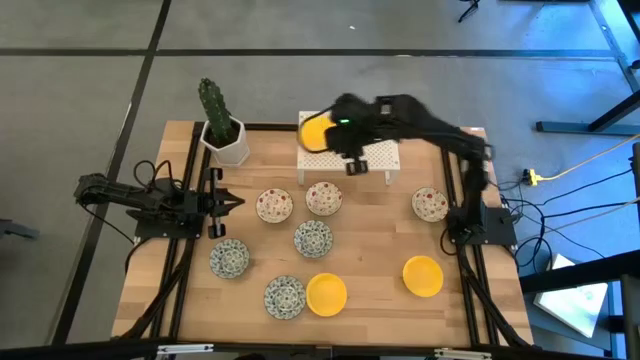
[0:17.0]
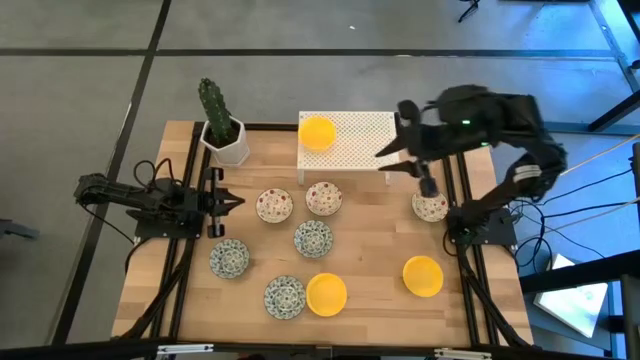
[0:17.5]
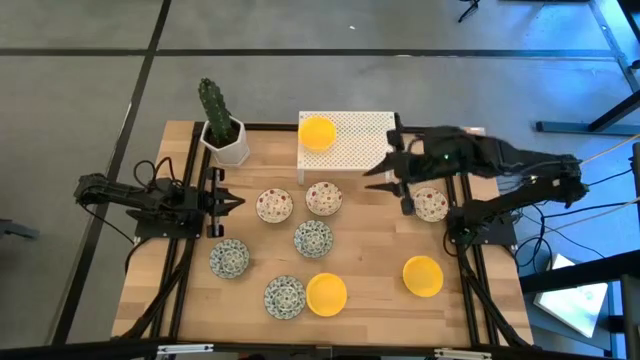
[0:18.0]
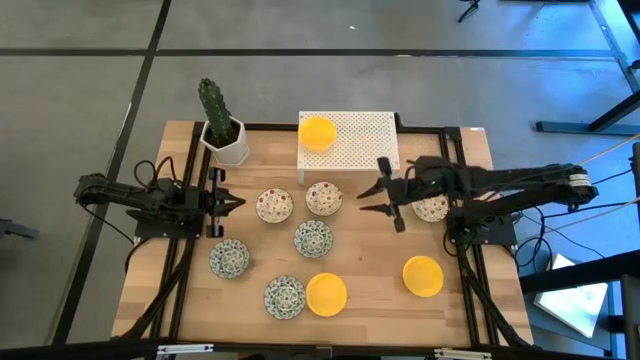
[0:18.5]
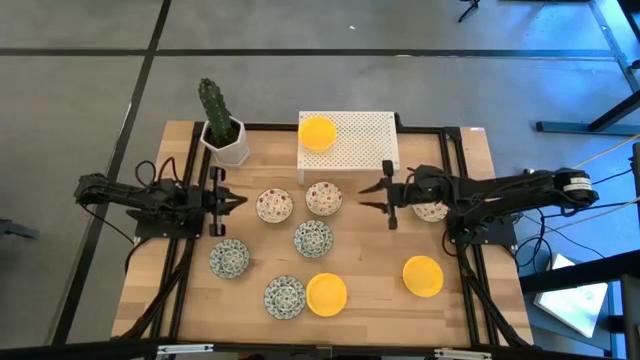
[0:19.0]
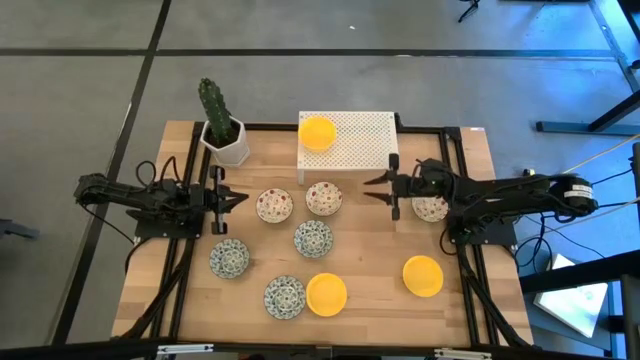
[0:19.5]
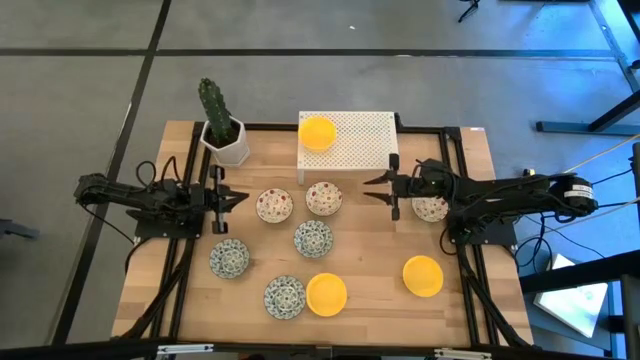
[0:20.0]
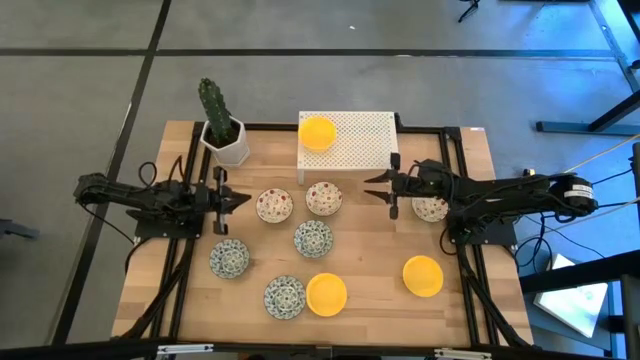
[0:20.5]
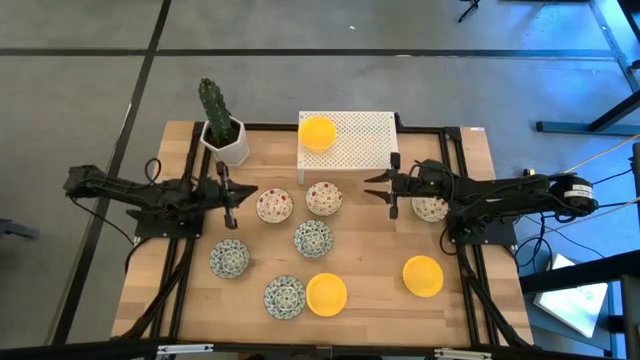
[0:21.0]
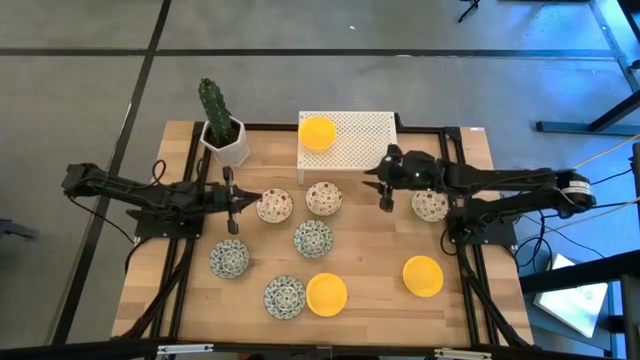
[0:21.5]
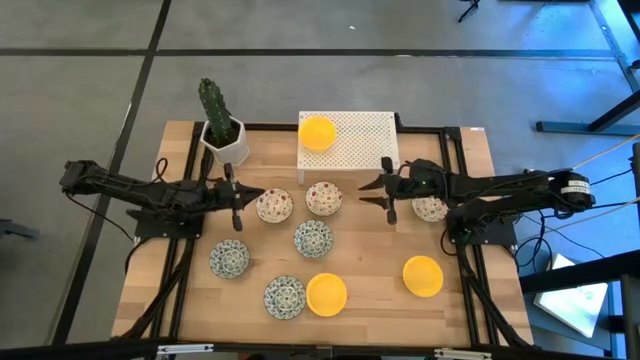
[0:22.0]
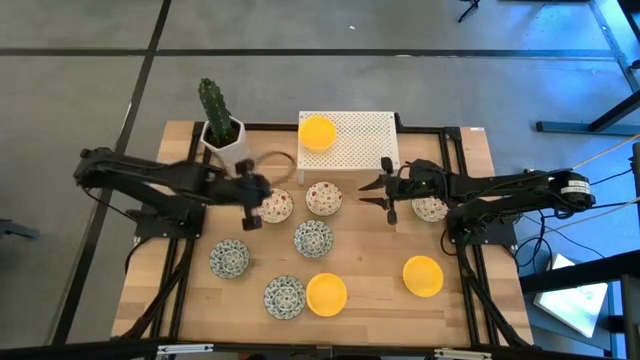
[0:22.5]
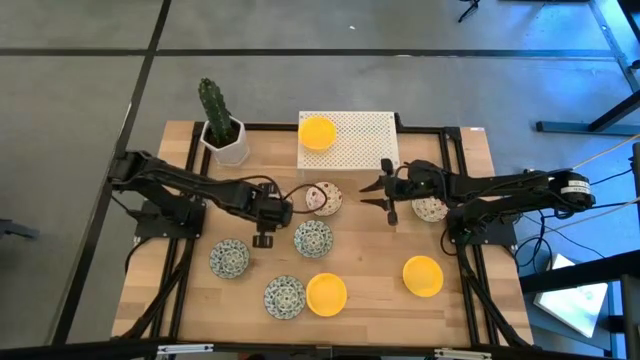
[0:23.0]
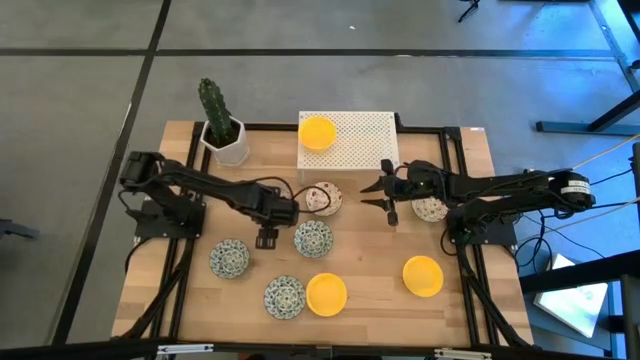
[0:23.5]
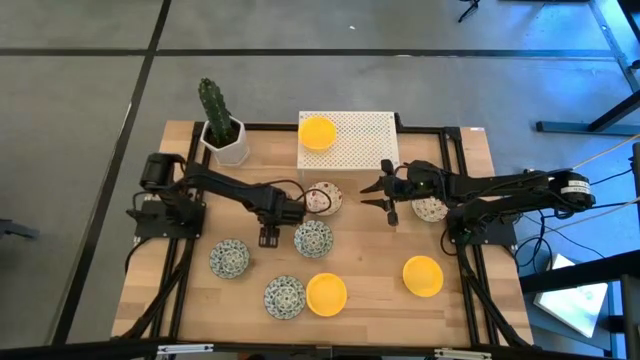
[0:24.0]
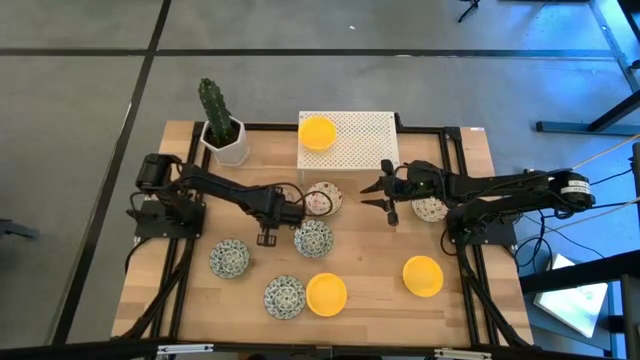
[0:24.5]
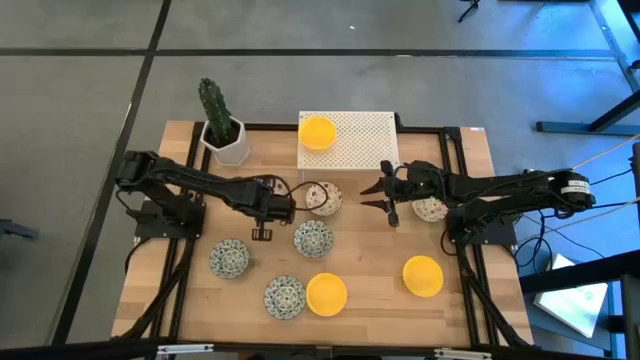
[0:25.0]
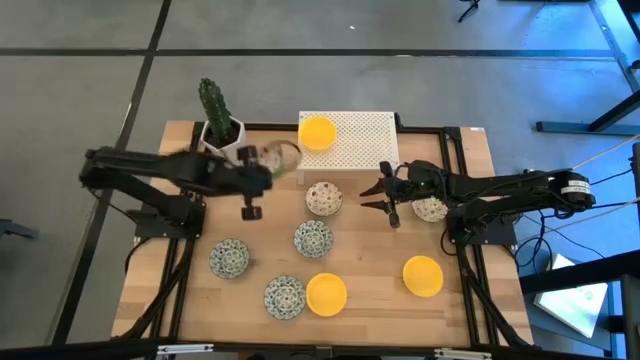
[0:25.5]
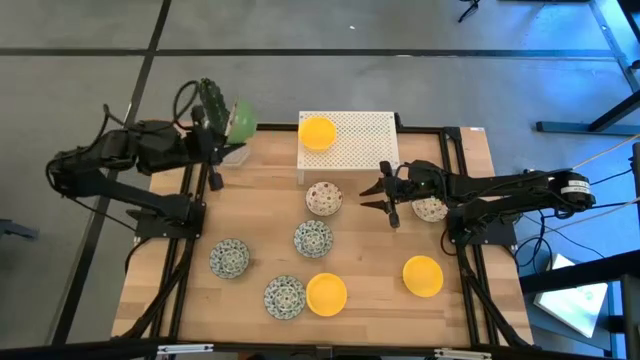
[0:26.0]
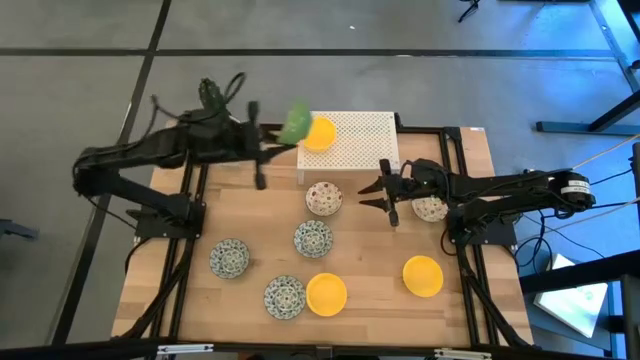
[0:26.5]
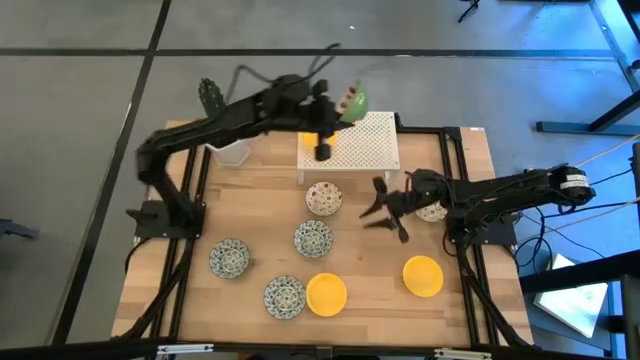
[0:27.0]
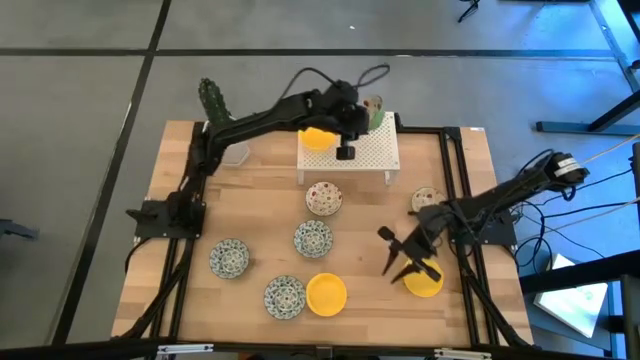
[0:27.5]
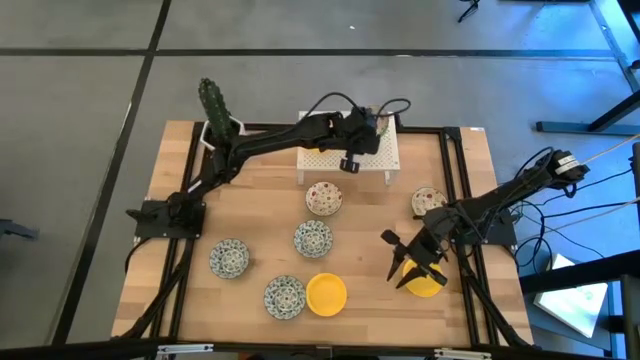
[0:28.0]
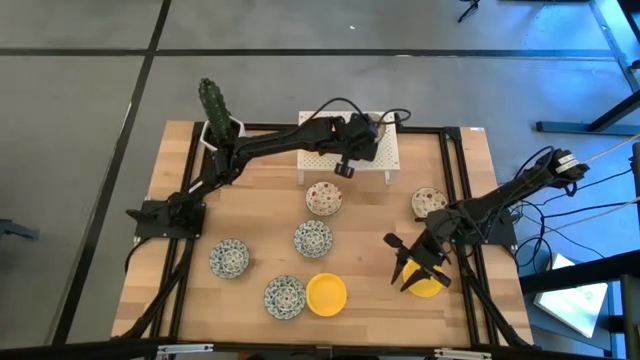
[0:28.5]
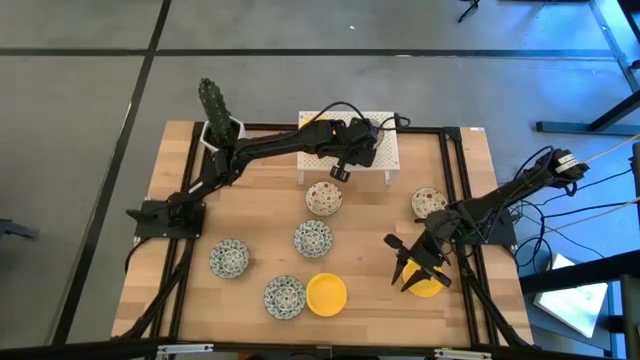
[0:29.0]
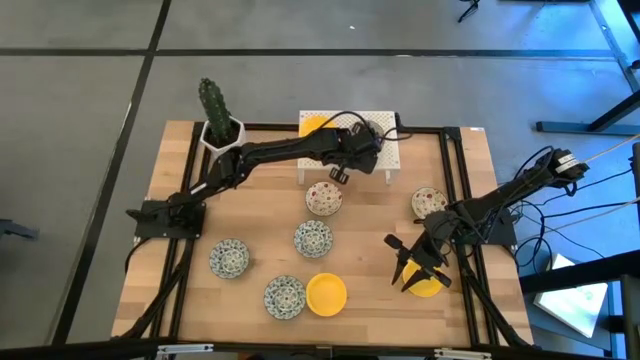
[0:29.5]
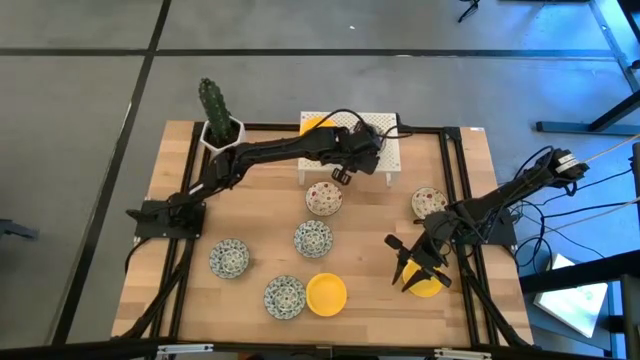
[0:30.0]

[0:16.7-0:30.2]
Task: Pick & Place Mini bowls
Put the left green bowl on the shelf

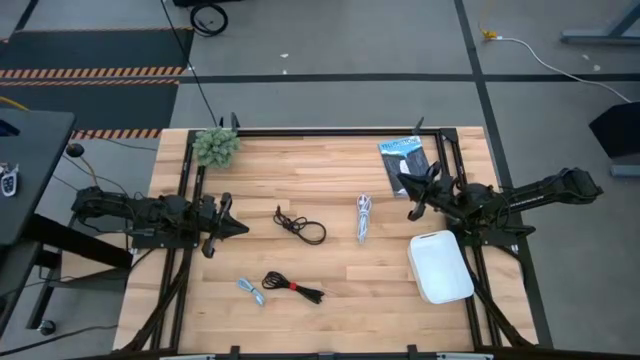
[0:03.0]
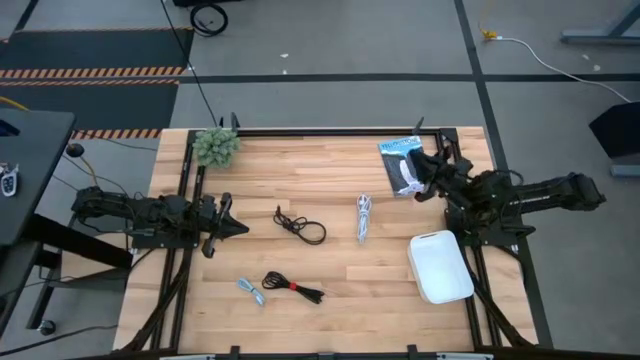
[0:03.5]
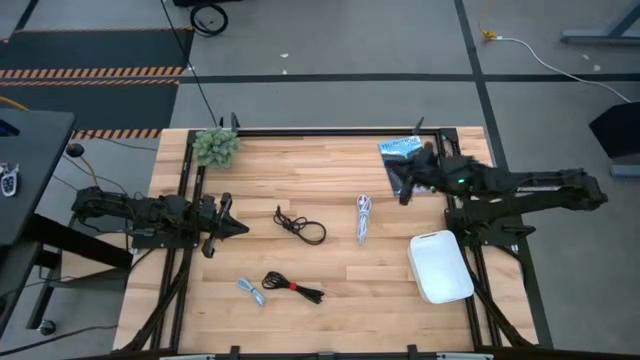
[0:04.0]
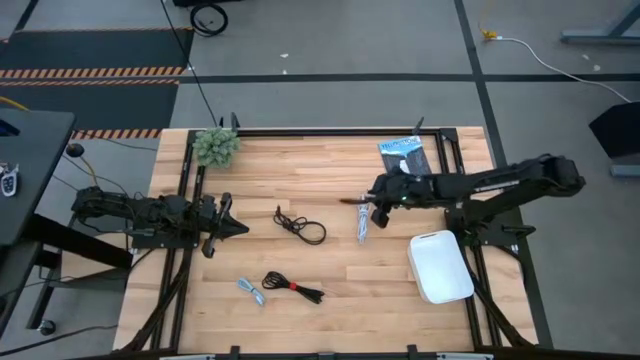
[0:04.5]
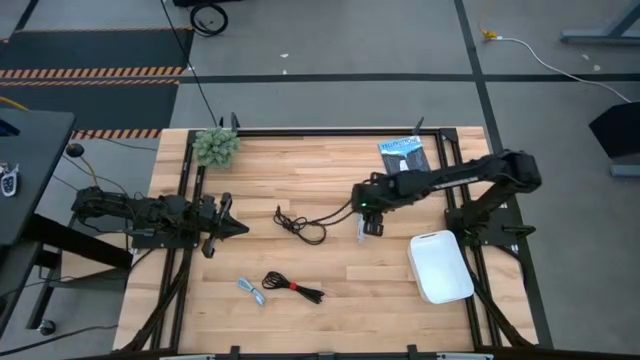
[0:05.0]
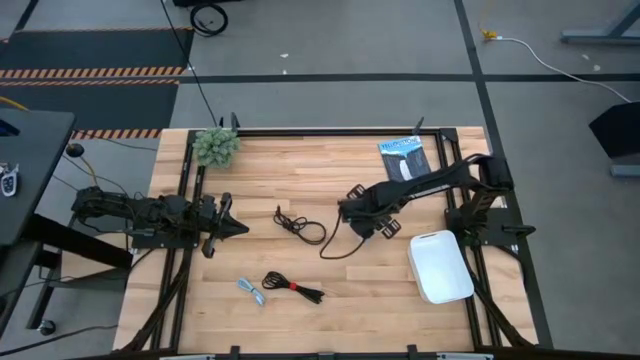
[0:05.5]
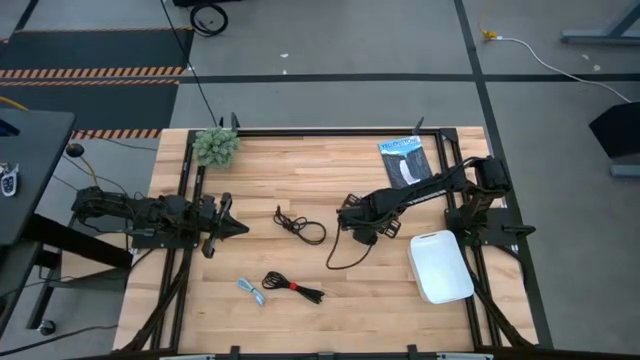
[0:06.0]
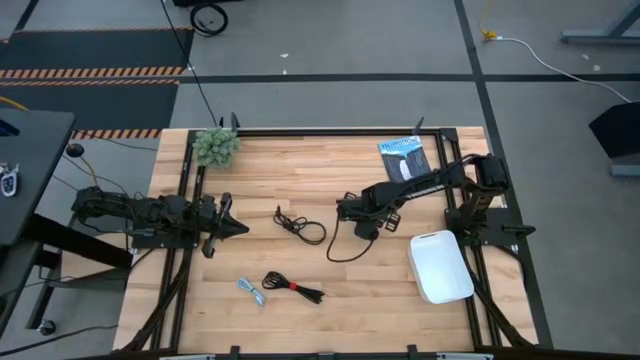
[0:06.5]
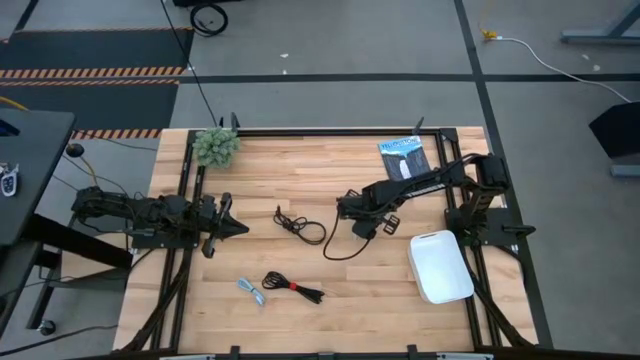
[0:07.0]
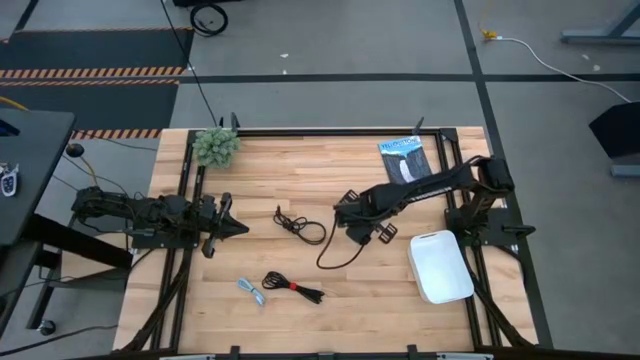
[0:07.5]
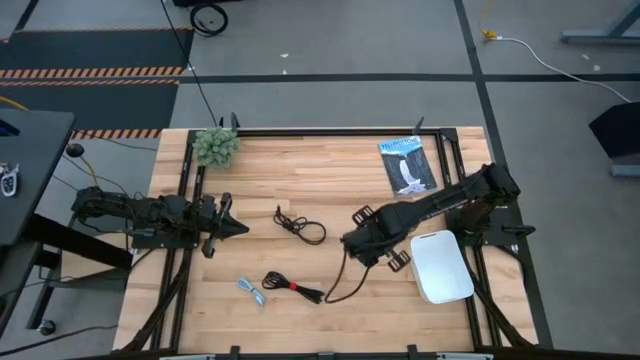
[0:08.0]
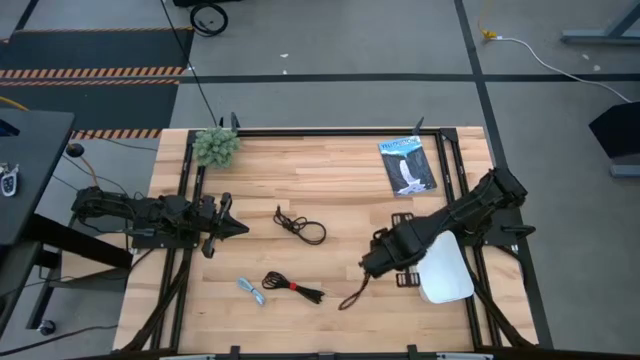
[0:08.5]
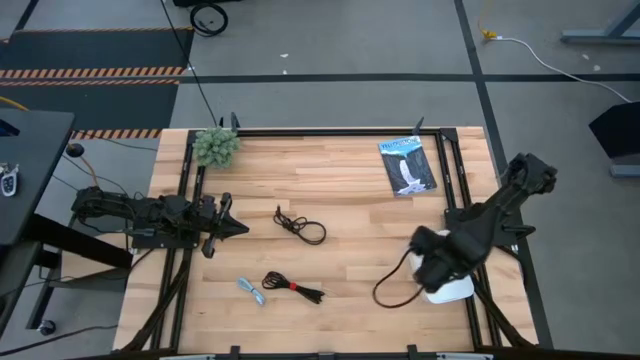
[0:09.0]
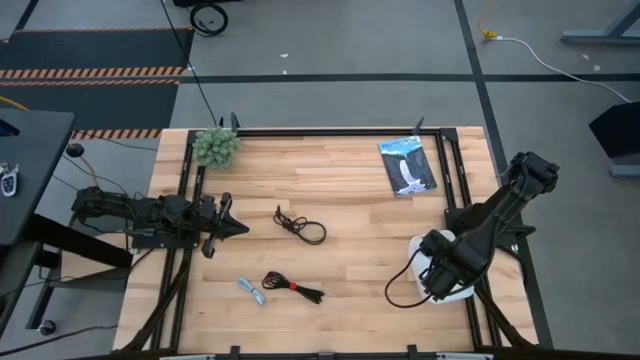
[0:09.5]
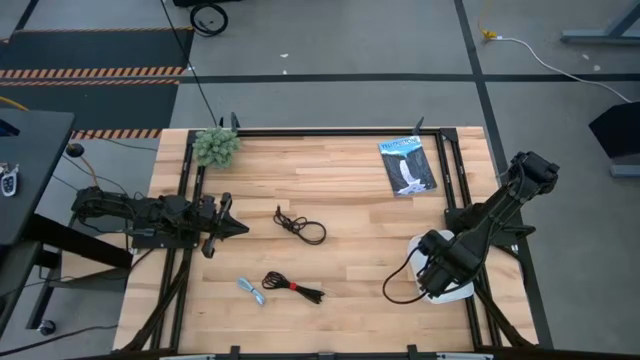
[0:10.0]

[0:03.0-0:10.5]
Task: Pick and place USB-C Cables
Put the white charger cable into the white container
